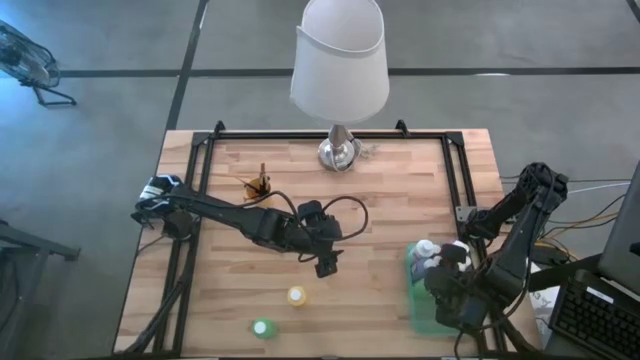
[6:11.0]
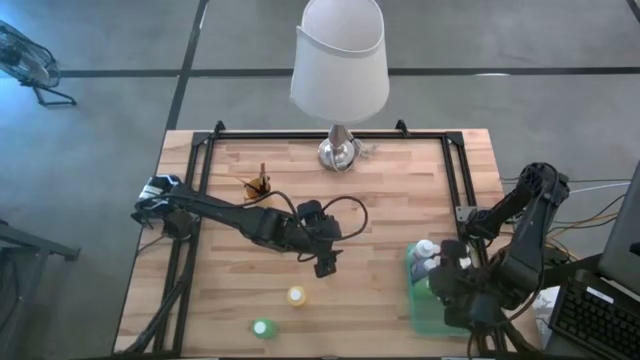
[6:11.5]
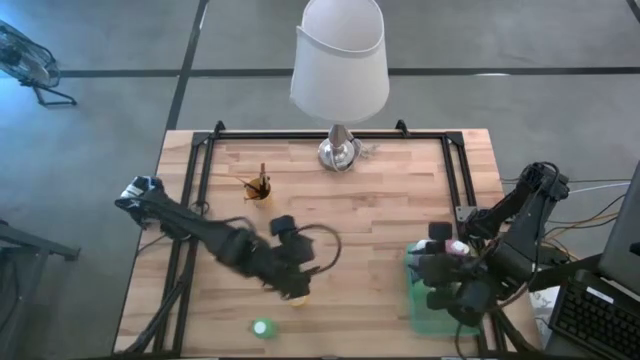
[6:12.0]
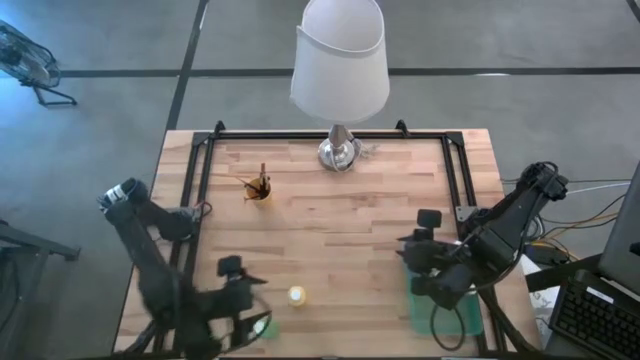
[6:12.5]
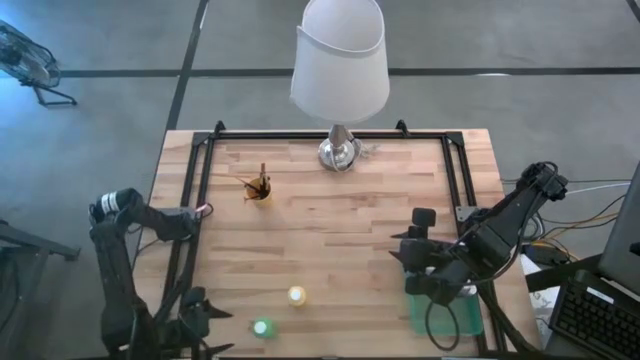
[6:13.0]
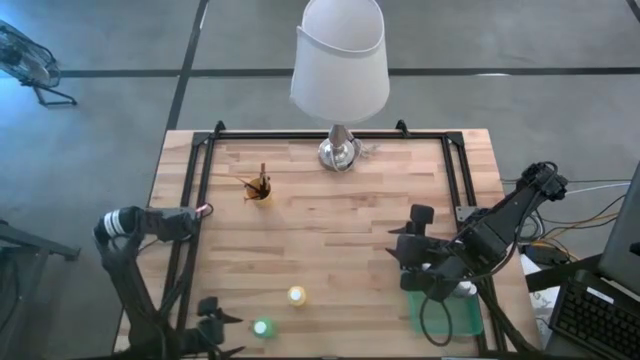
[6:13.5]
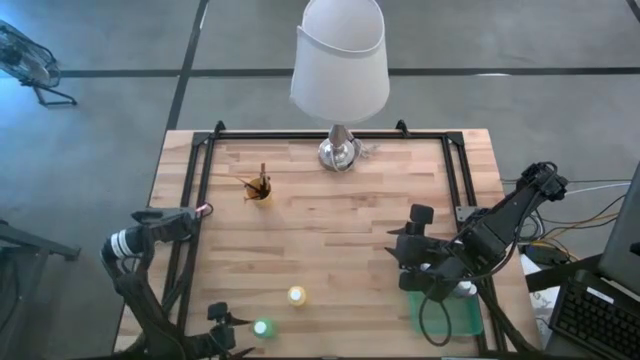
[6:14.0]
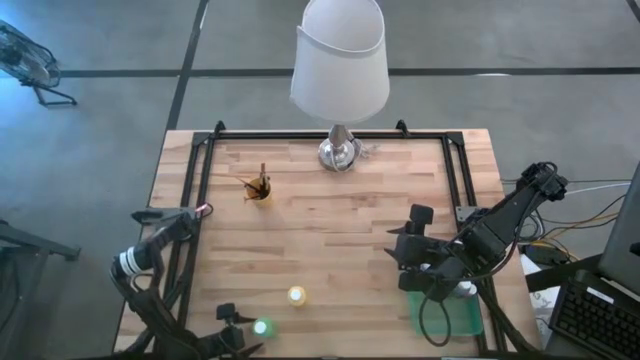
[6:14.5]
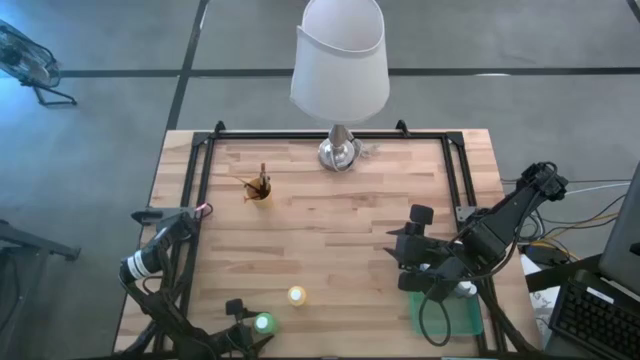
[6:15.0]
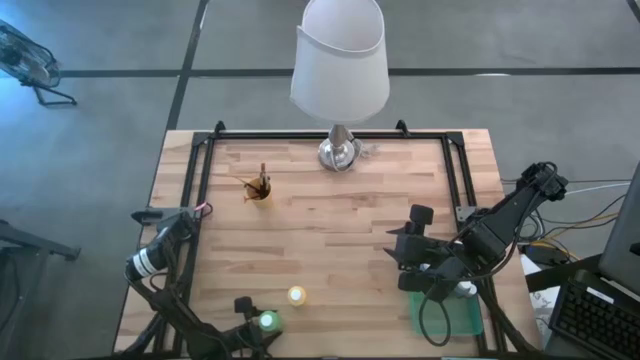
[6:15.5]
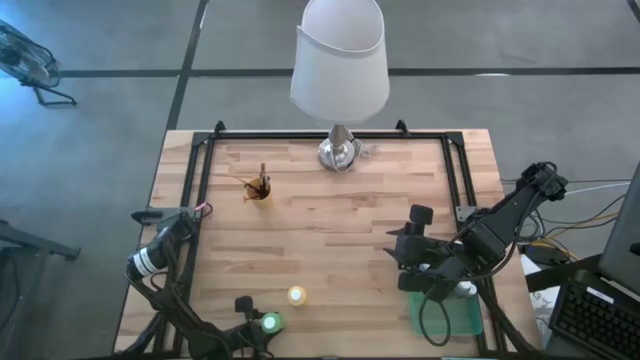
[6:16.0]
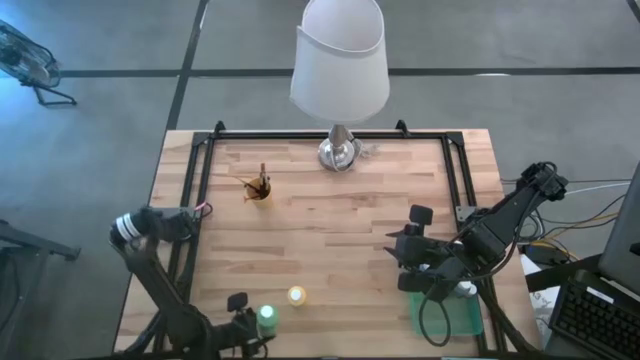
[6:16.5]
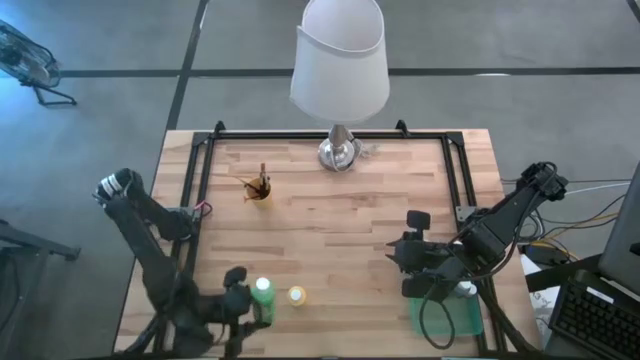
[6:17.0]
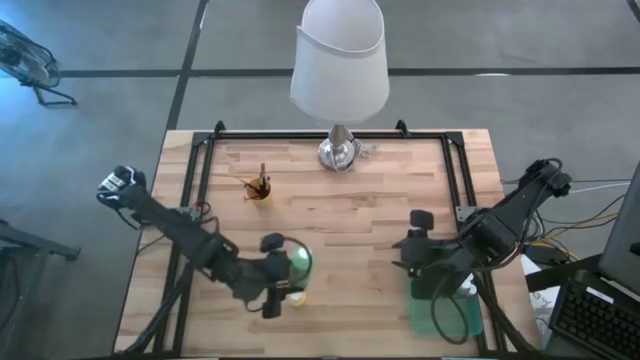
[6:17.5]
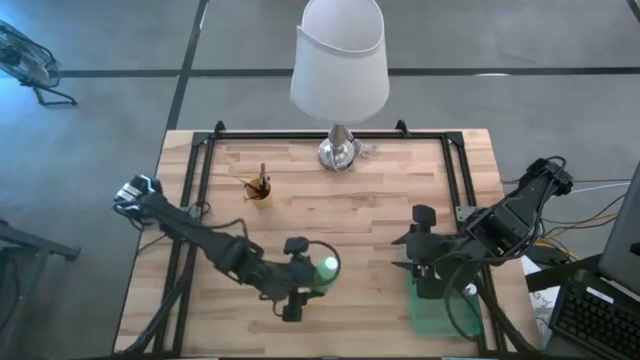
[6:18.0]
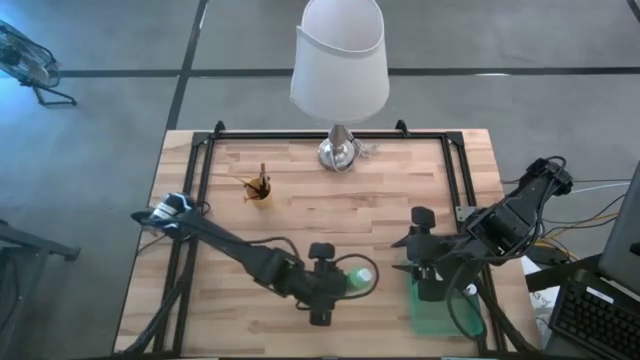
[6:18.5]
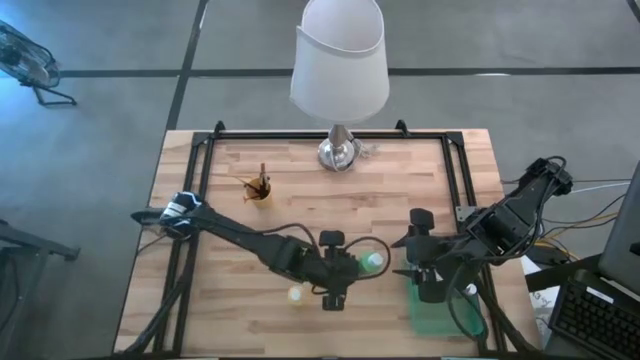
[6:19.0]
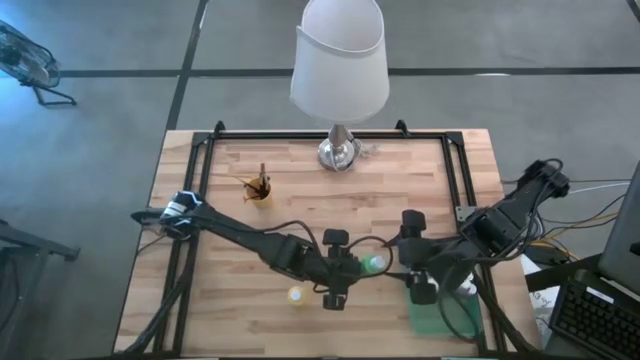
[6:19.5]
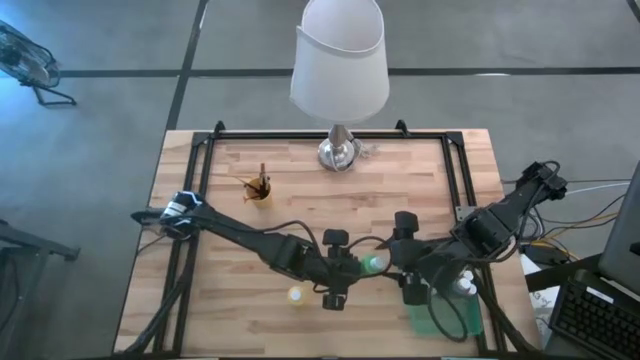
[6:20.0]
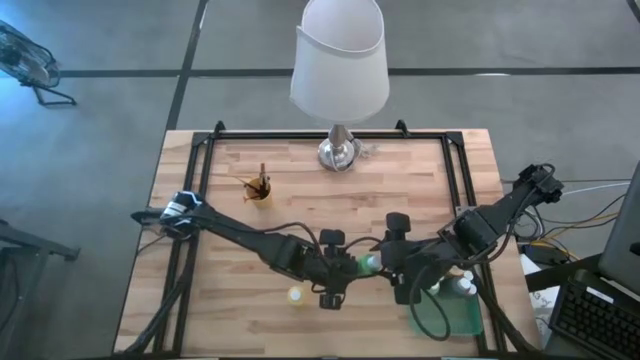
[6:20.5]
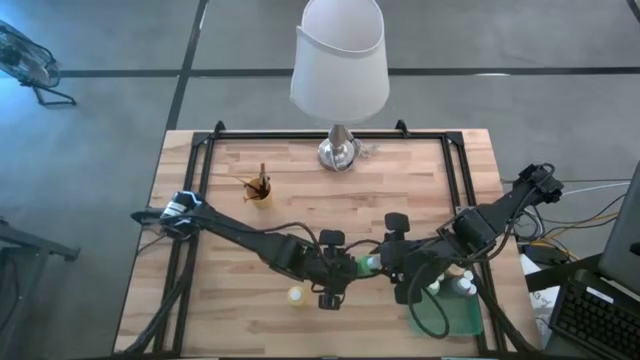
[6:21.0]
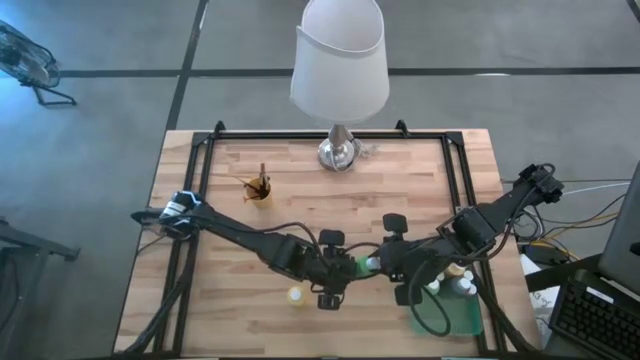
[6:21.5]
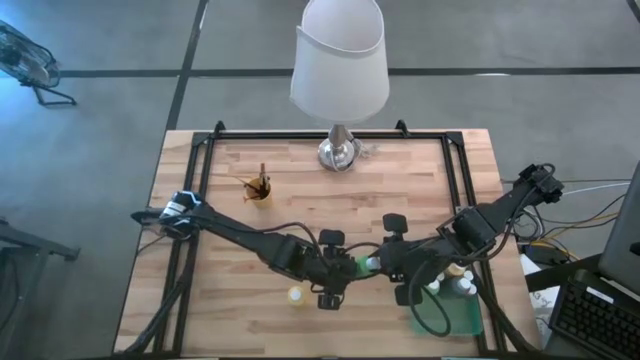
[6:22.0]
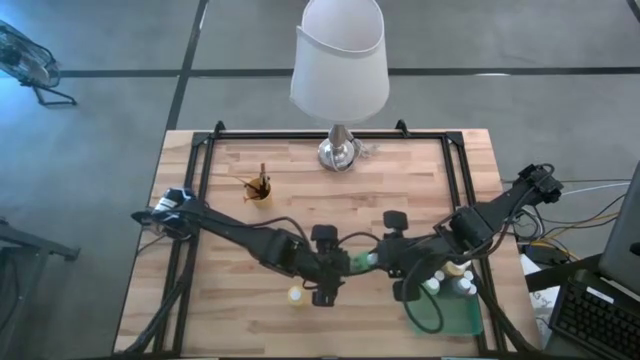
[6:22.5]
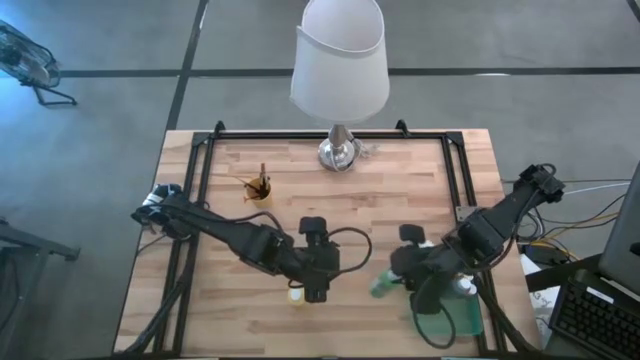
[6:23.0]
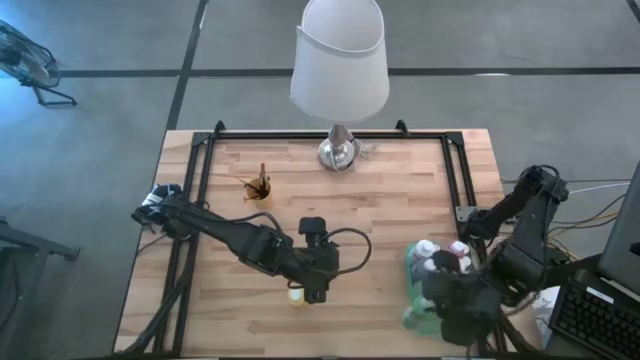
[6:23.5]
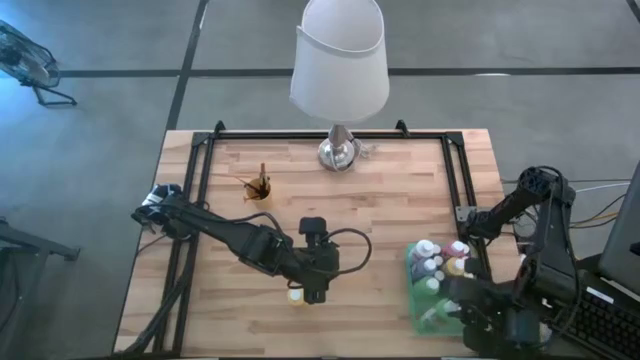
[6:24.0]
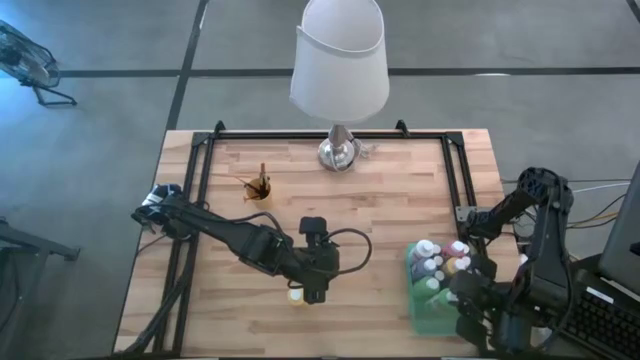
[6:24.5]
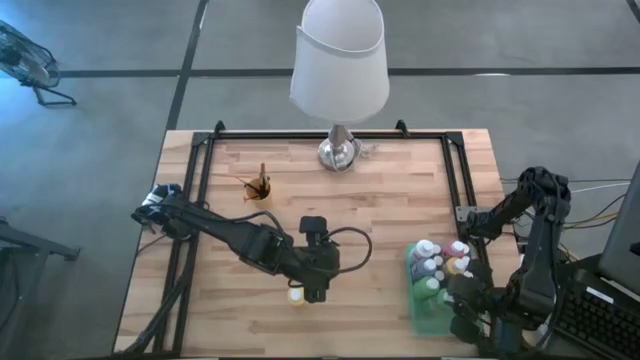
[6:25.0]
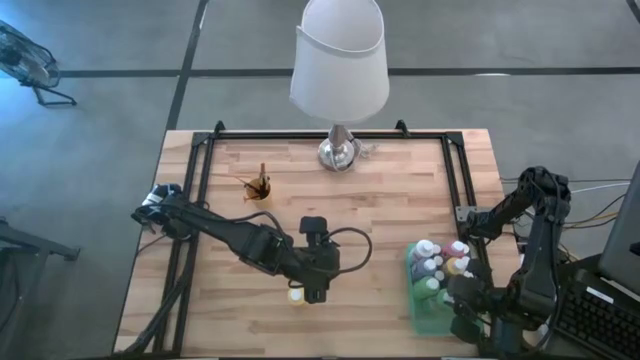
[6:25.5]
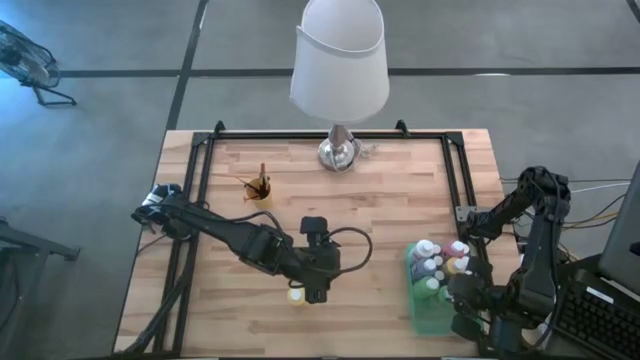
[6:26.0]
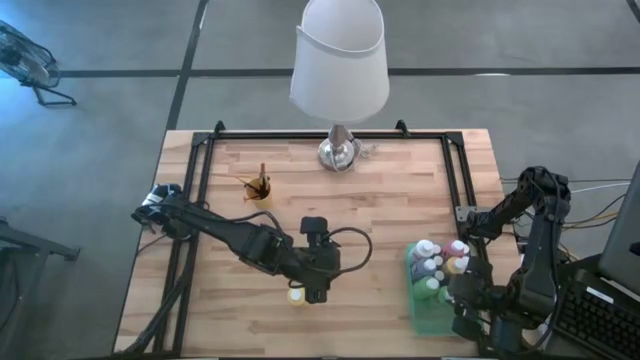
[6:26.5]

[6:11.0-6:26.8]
Task: Pick & Place Paint Supplies
Put the green paint bottle into the green bin
